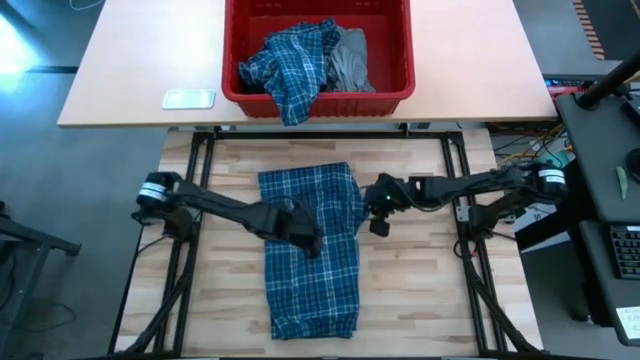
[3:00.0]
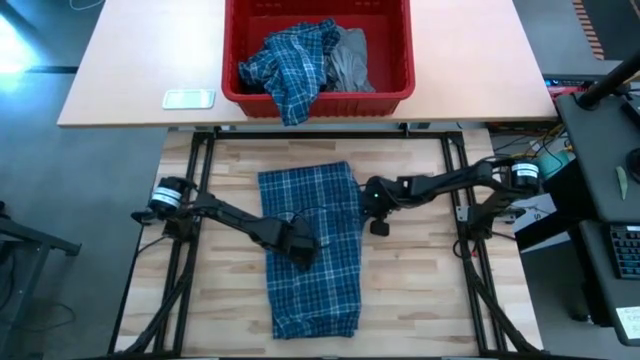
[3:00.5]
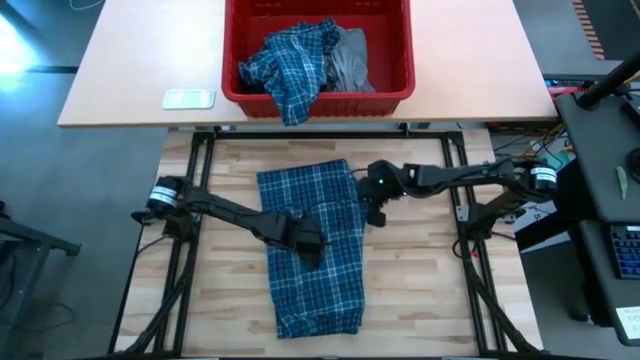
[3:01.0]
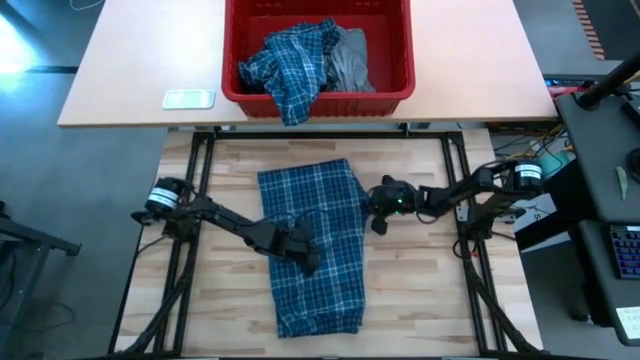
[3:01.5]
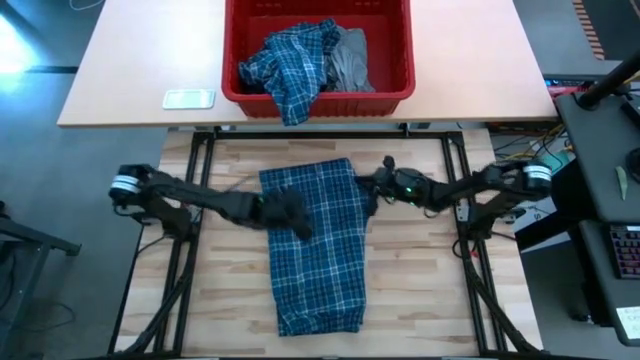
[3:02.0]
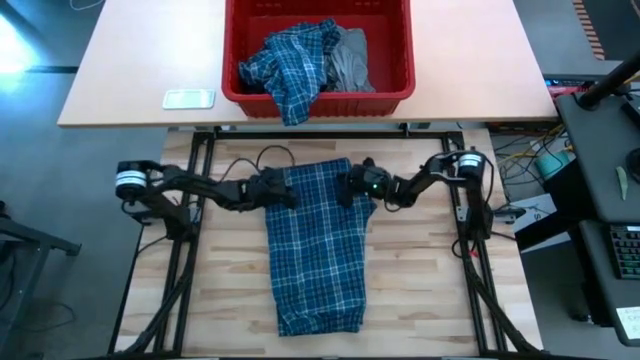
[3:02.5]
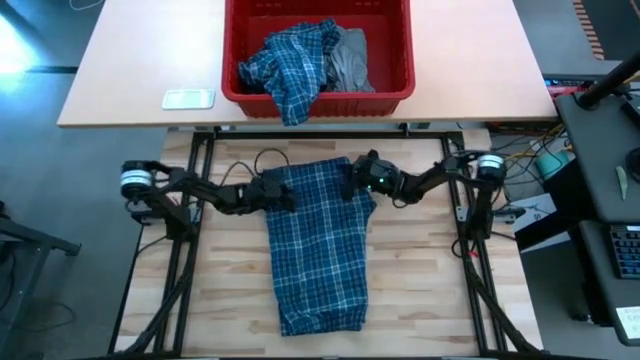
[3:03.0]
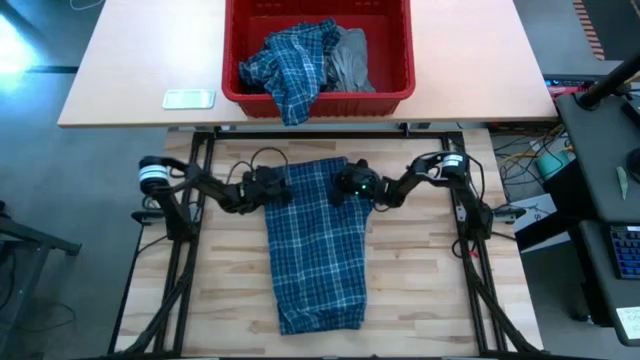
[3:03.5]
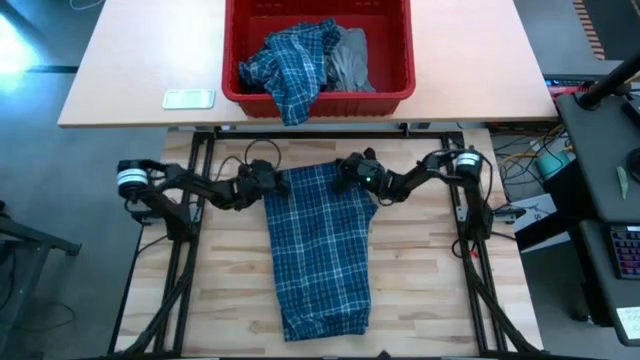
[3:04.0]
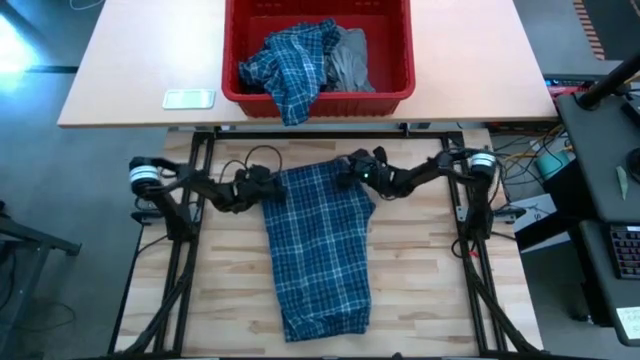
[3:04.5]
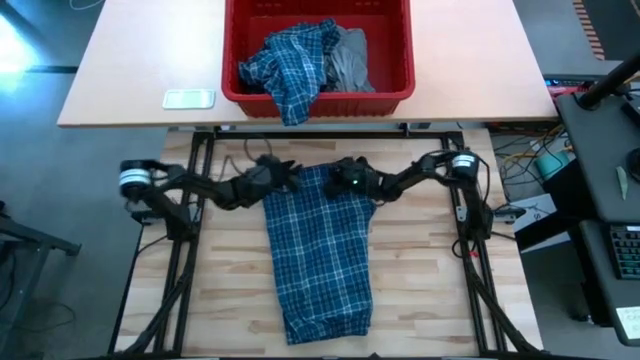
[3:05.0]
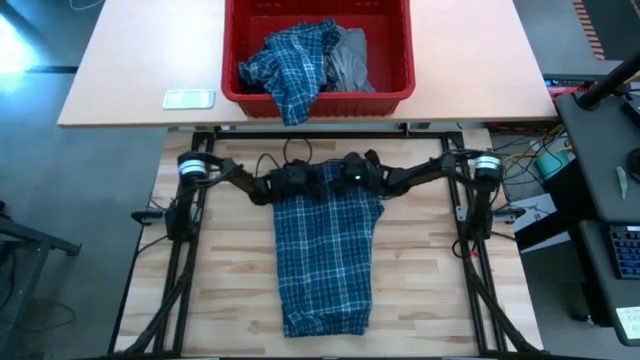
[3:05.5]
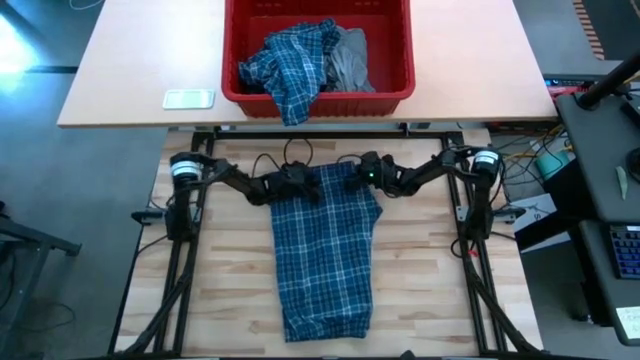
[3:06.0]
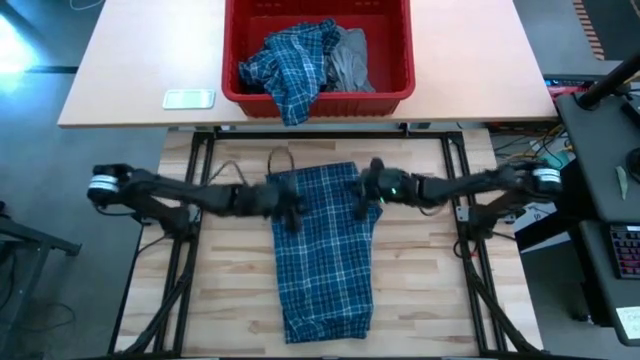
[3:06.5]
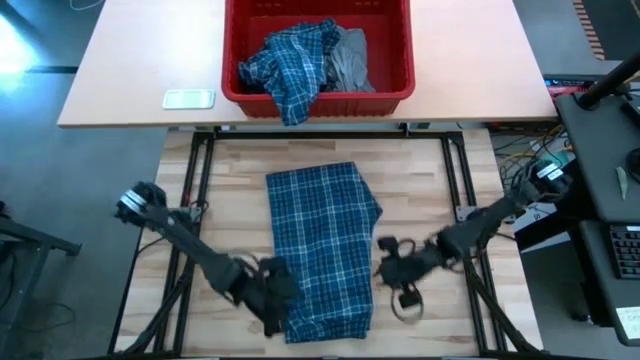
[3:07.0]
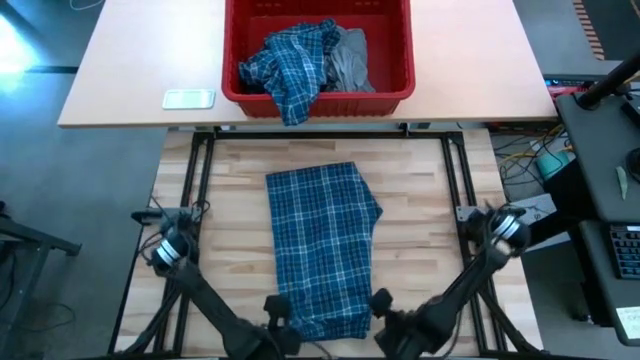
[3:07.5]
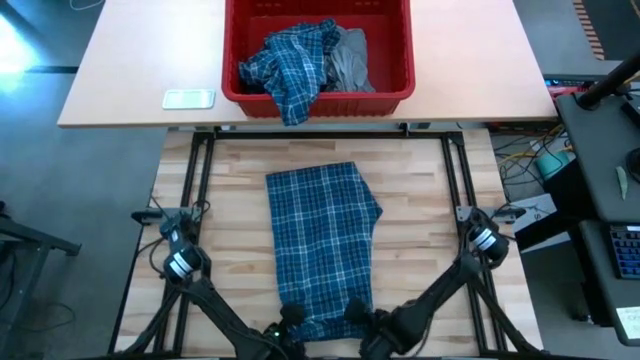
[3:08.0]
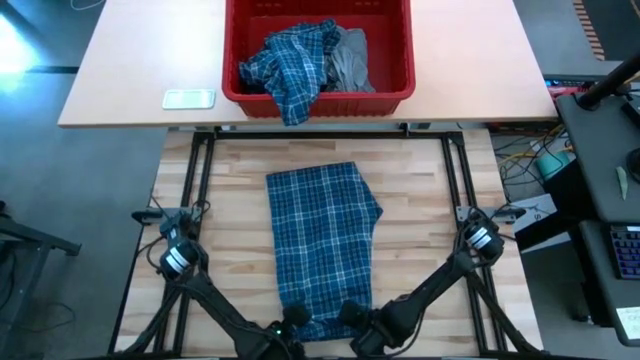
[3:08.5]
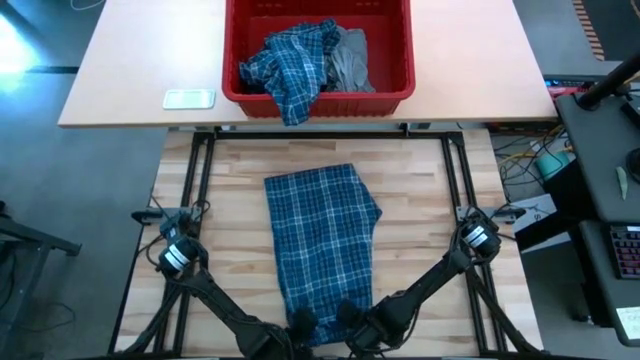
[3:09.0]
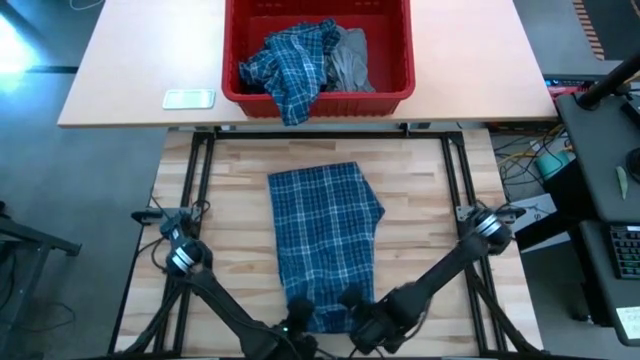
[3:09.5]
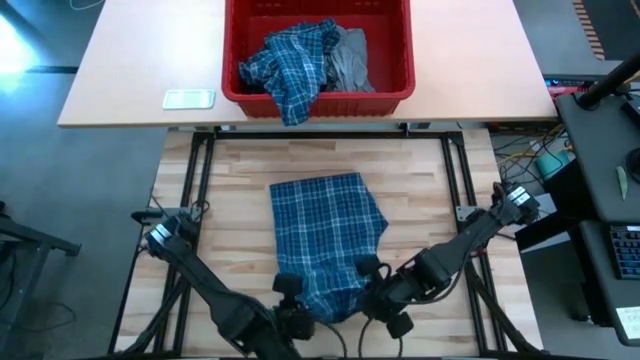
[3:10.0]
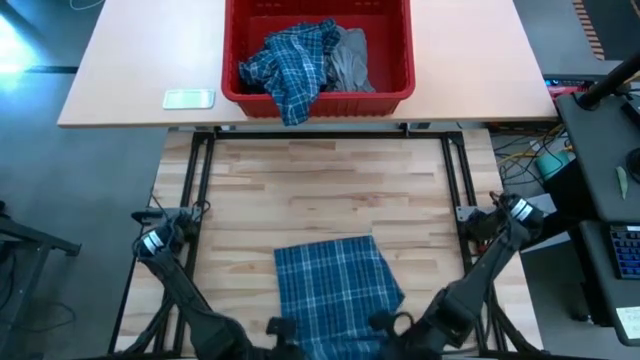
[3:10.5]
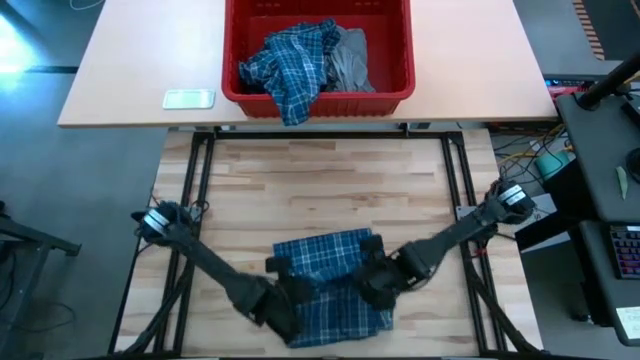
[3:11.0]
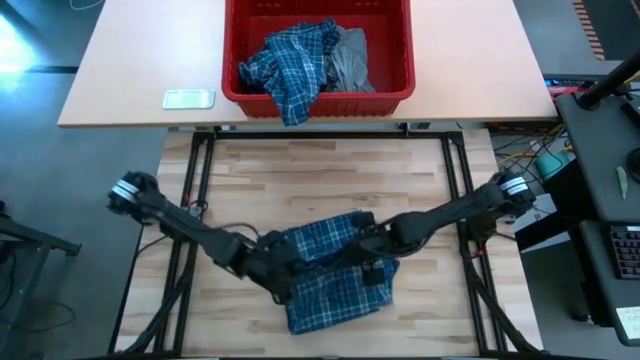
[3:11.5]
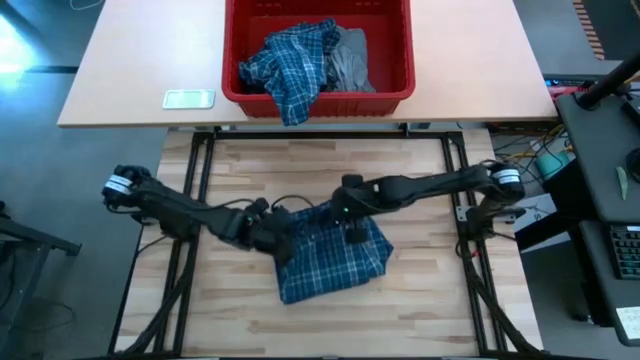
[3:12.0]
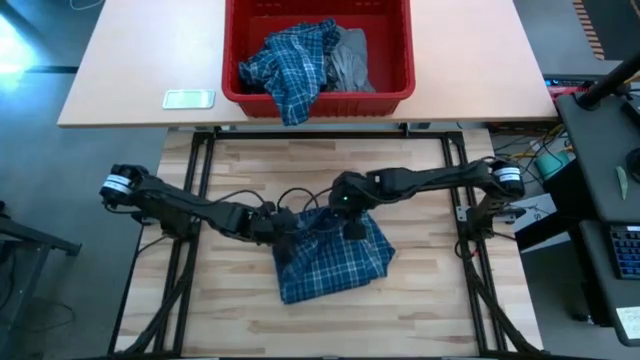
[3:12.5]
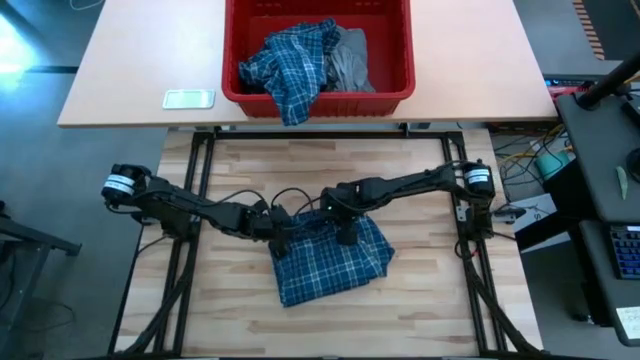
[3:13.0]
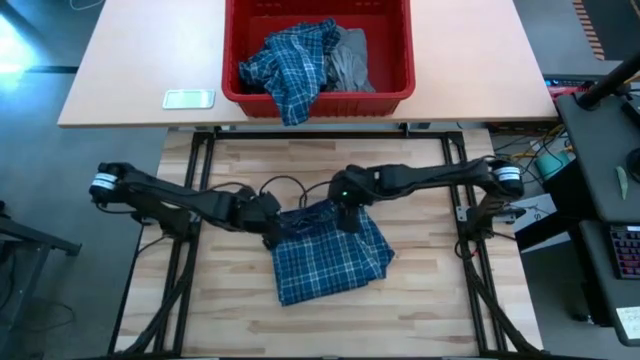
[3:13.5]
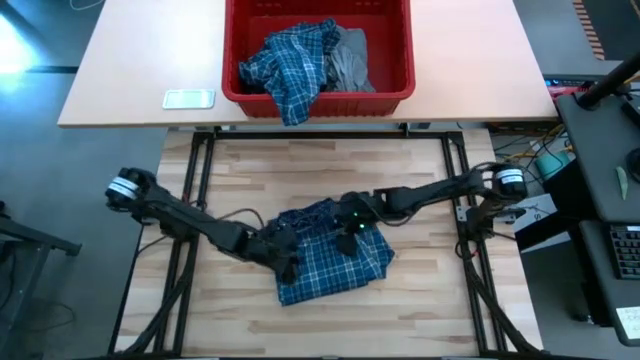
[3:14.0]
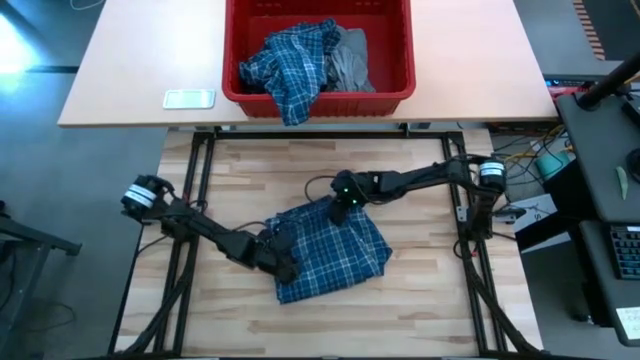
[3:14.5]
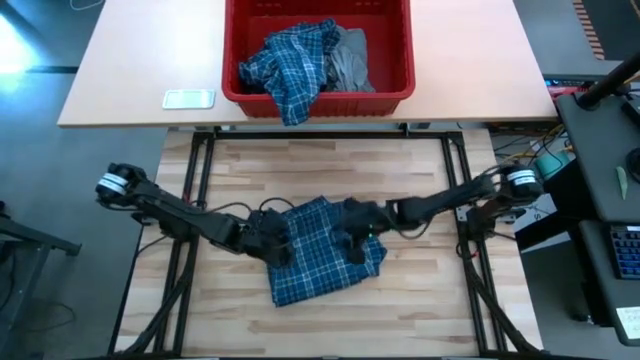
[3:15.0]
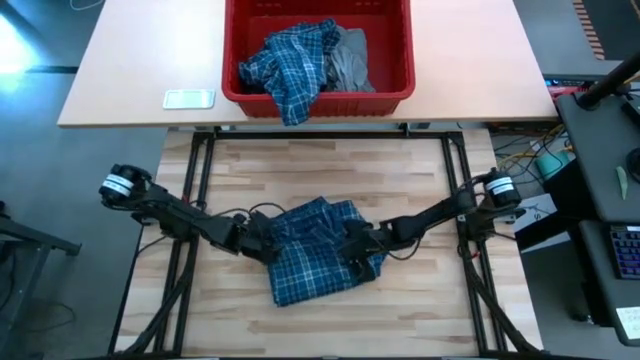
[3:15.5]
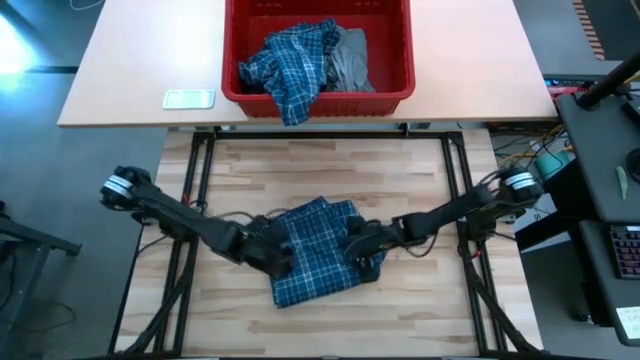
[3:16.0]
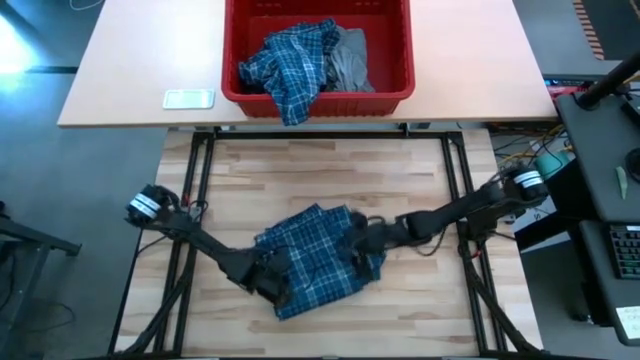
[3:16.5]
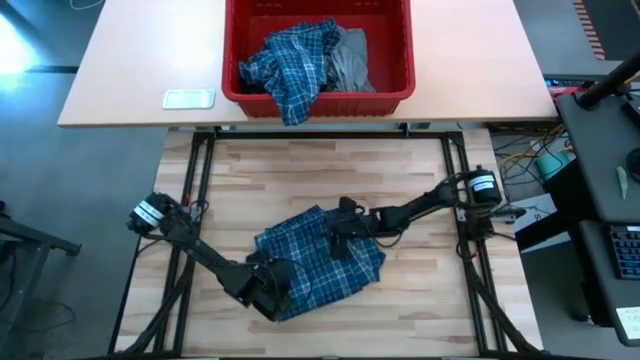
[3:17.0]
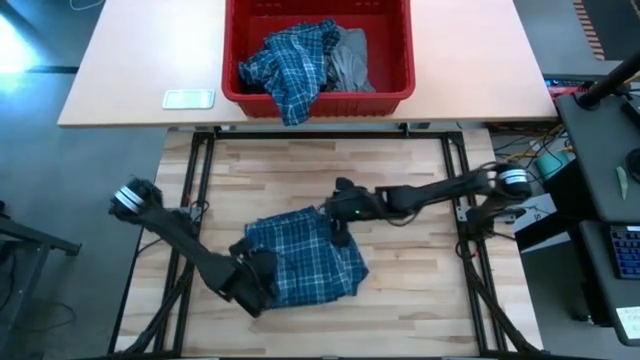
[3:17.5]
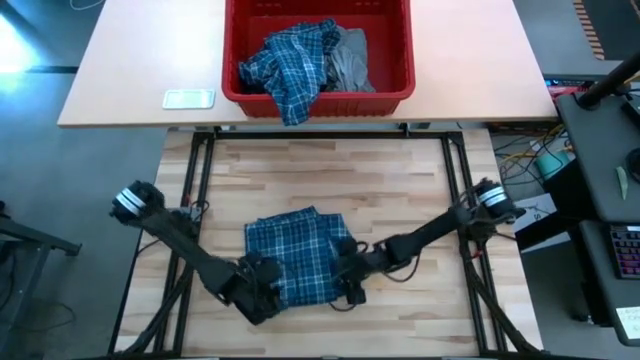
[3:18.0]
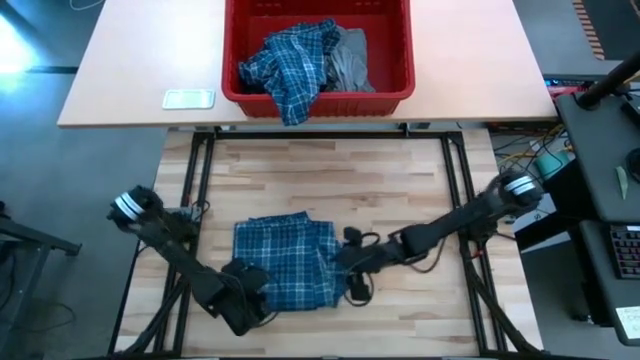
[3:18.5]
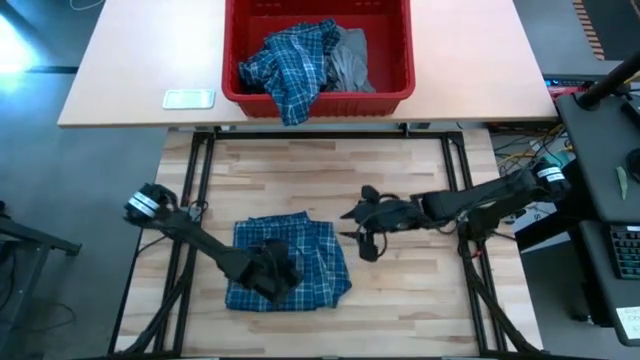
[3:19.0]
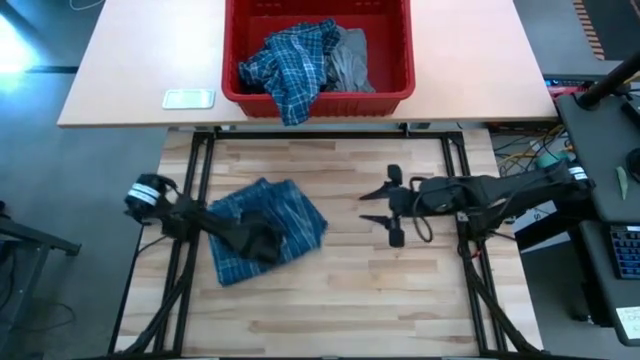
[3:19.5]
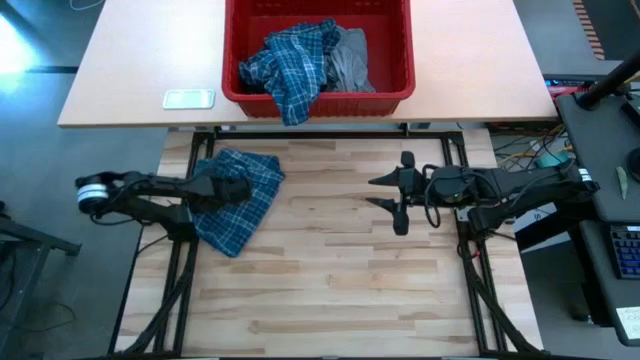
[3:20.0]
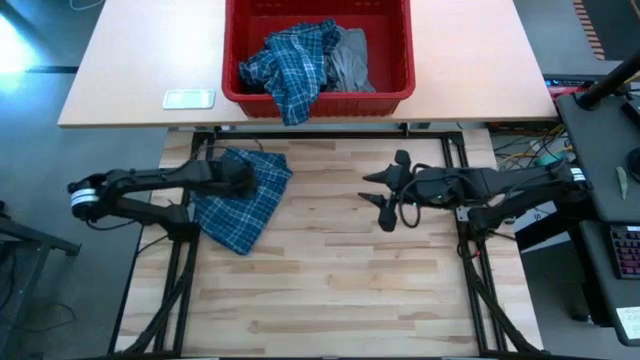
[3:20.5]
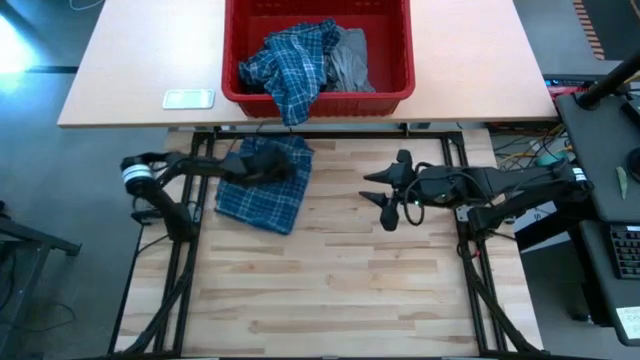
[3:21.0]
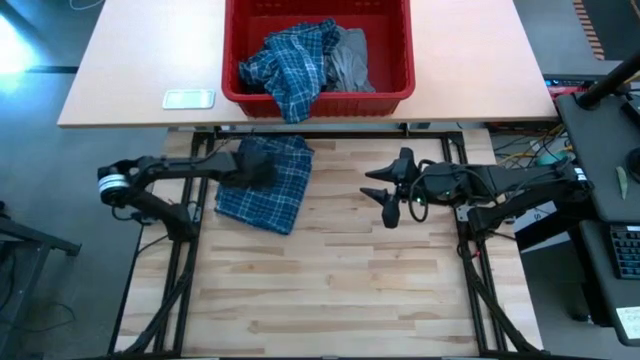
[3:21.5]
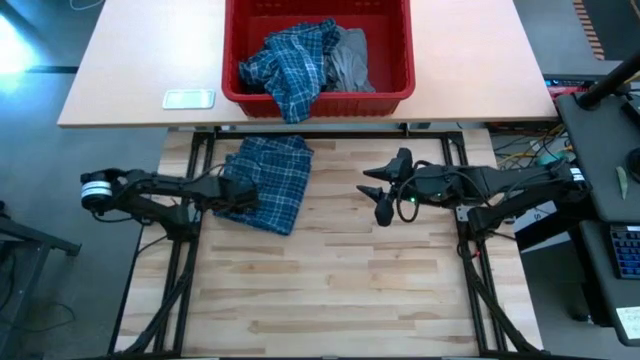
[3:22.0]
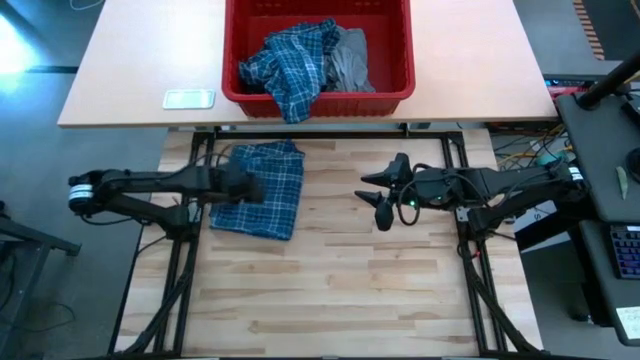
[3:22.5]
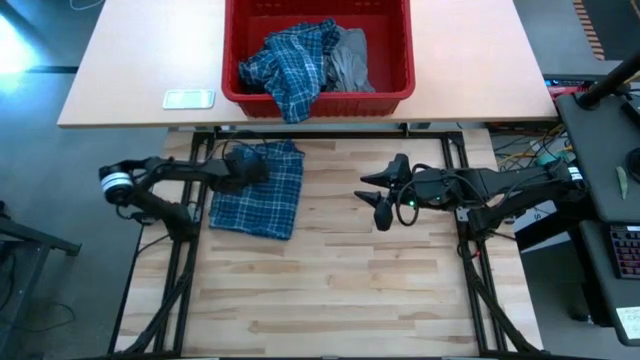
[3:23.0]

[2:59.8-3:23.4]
Task: Fold Laundry from Bin
Fold the blue patterned pants
